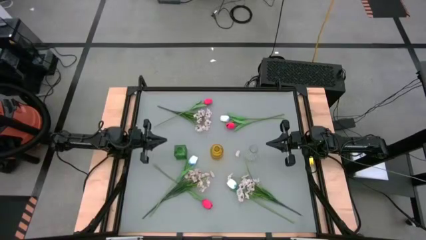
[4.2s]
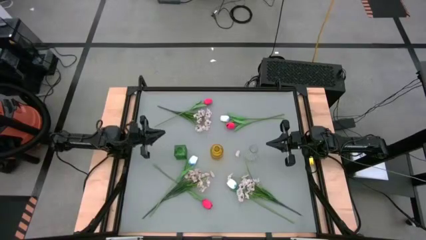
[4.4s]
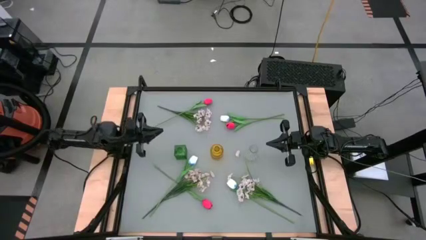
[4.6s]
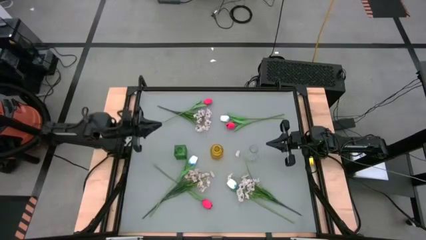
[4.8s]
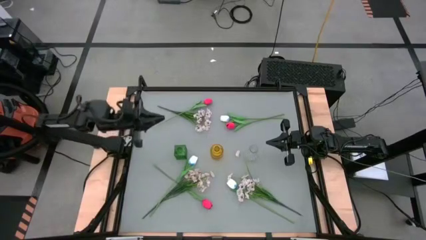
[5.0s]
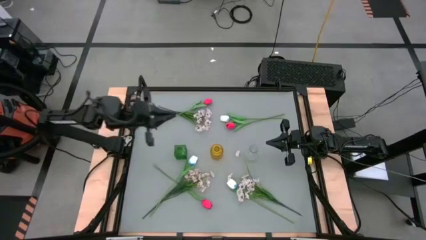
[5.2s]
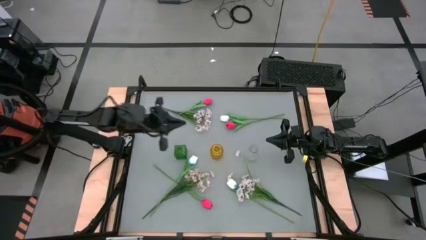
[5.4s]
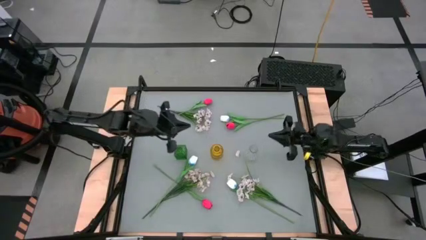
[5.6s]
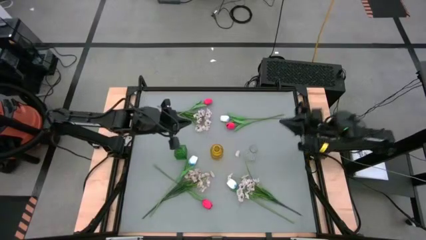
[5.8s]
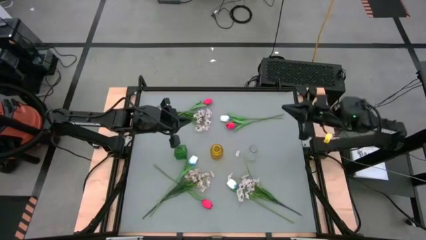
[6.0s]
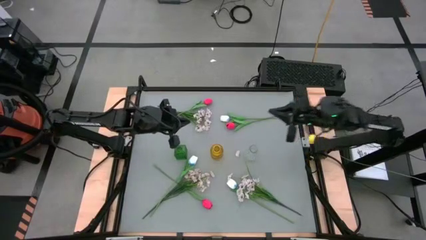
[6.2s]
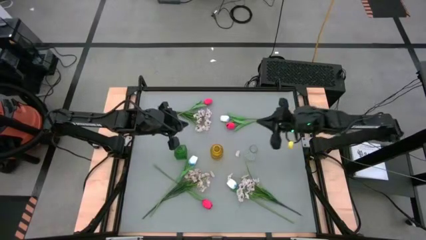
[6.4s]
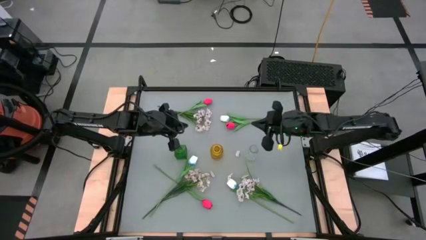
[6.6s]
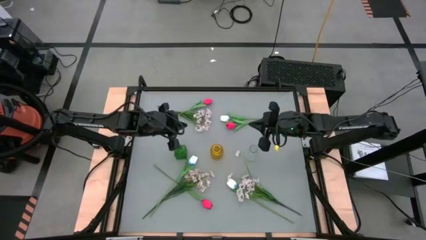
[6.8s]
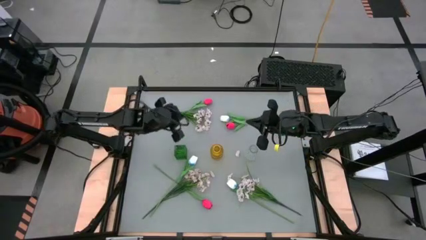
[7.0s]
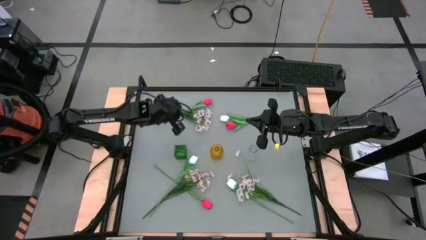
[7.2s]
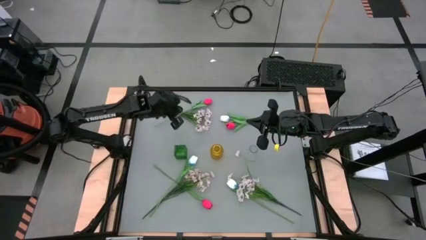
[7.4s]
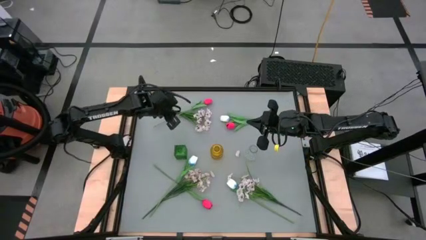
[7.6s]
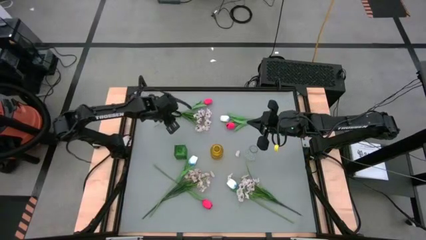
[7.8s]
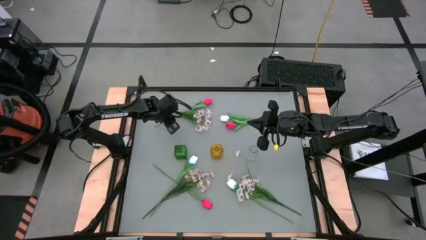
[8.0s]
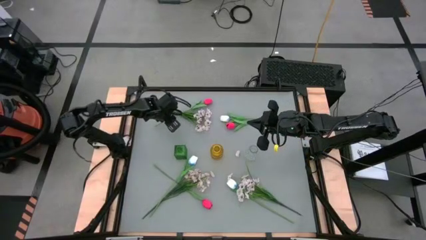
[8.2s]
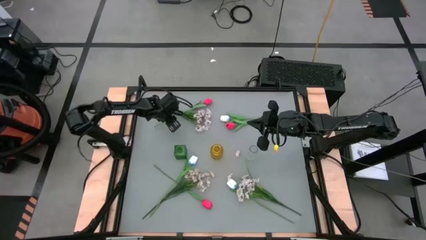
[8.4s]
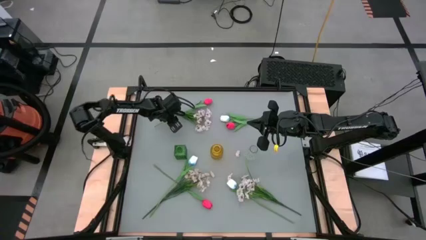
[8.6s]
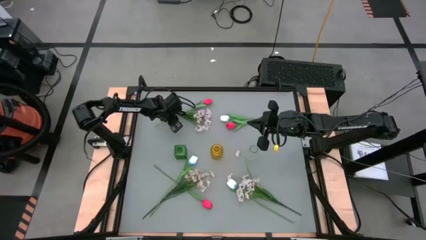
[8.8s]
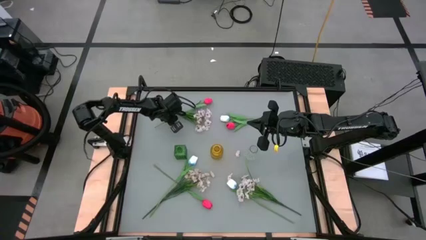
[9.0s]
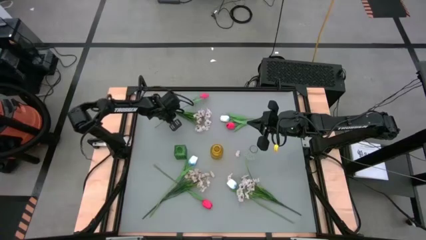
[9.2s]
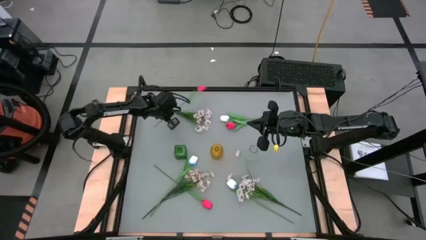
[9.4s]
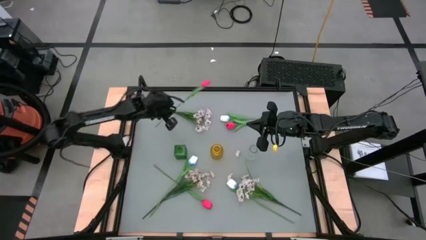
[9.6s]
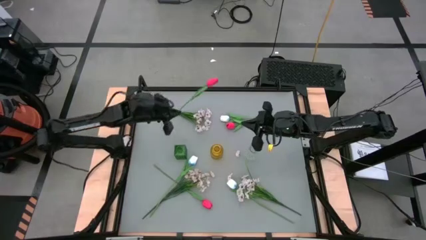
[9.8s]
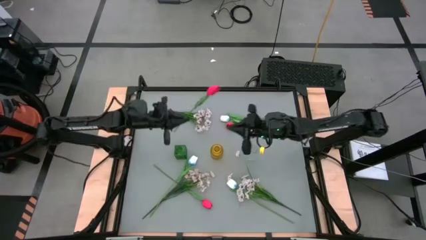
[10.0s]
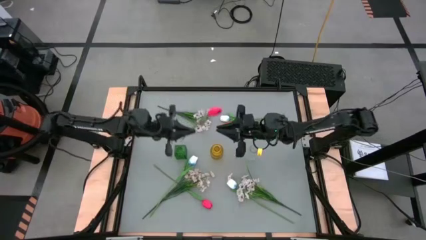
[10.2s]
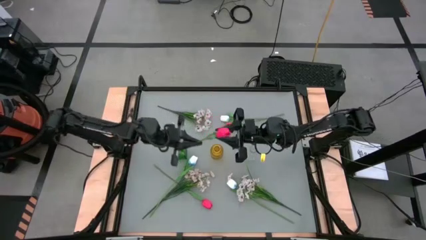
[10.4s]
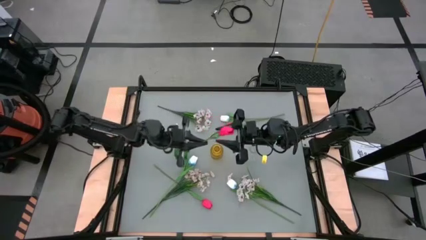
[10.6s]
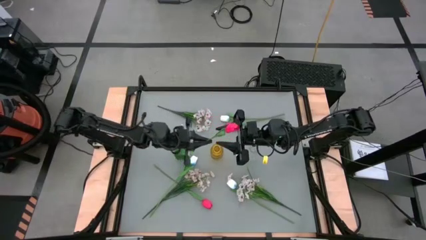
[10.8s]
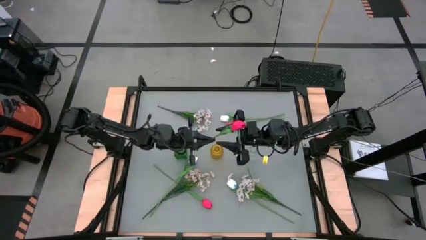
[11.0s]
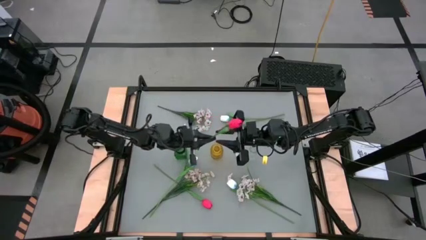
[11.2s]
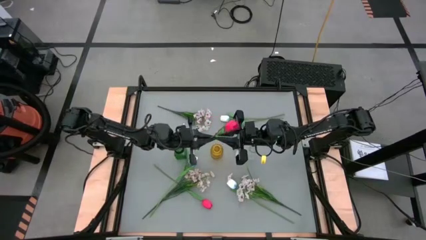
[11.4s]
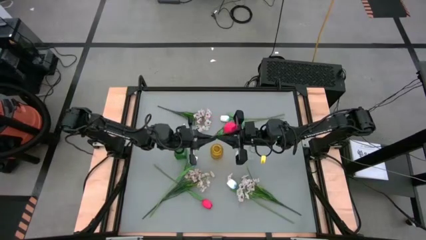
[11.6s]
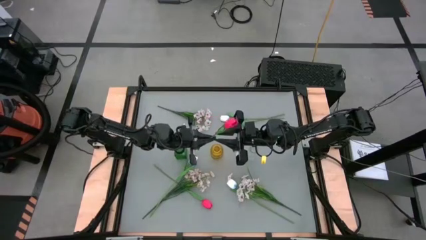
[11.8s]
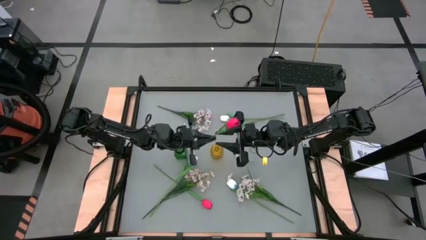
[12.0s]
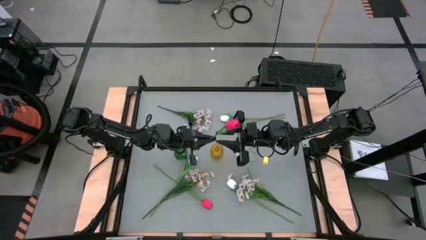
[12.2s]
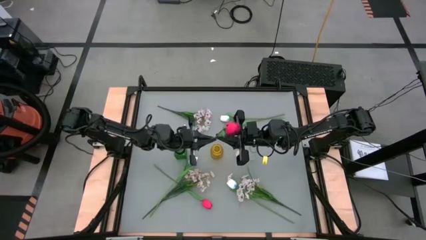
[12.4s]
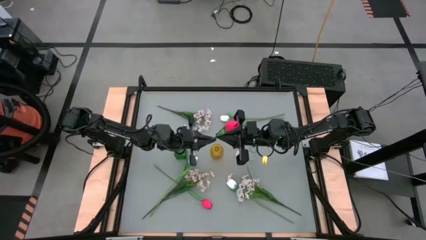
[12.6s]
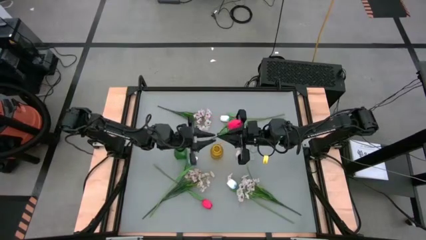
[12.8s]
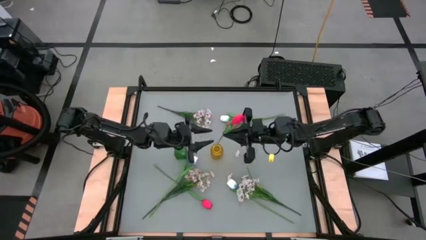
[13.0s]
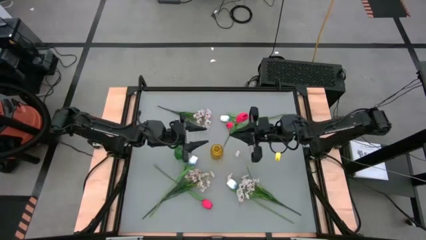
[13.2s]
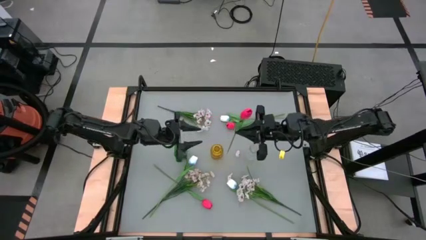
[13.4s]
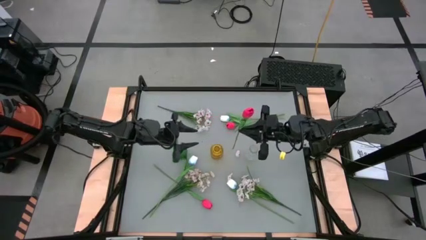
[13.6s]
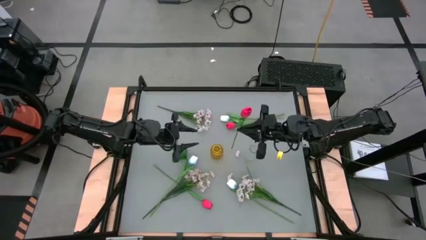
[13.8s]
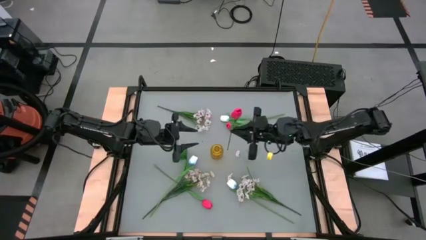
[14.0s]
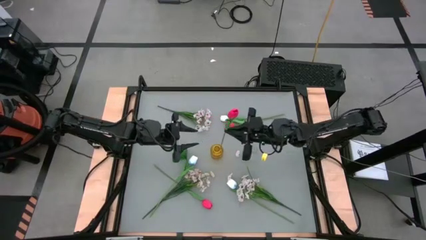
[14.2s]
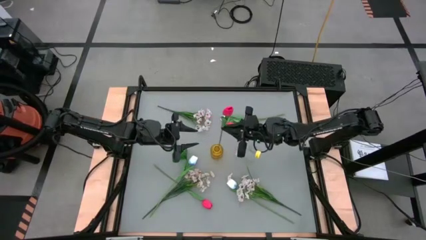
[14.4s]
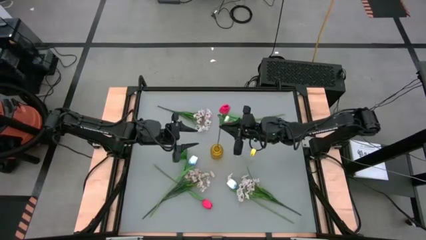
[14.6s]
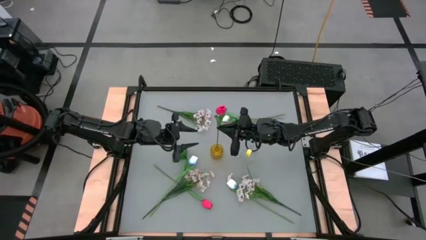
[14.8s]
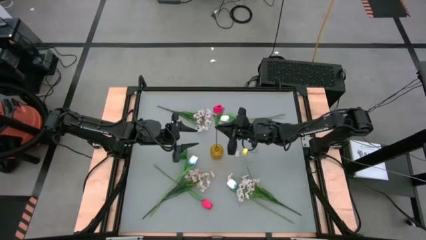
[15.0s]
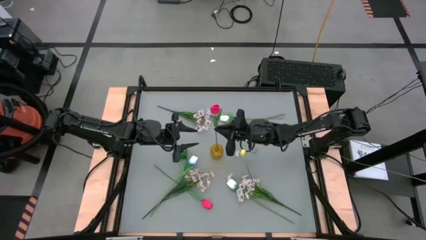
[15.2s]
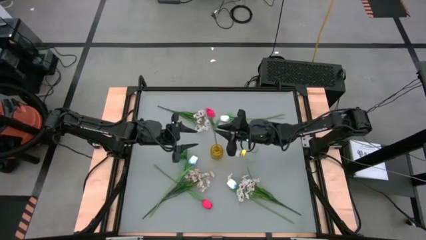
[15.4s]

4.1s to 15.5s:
Task: Sort flowers into vase by color
Put the top left pink flower into the yellow flower vase

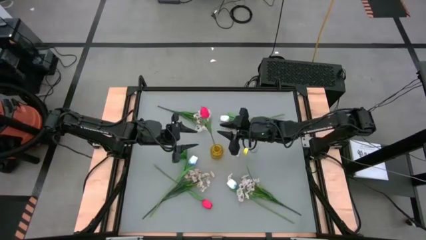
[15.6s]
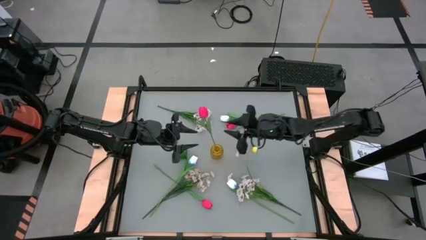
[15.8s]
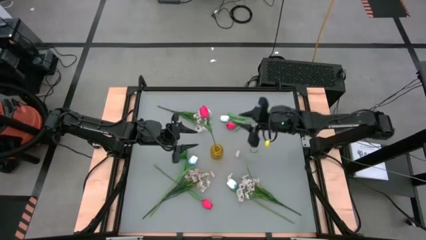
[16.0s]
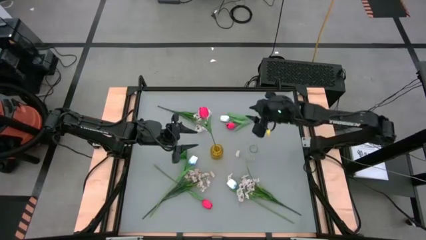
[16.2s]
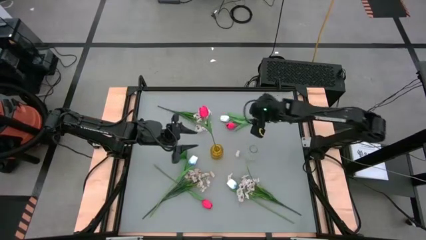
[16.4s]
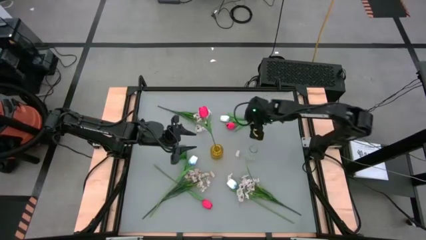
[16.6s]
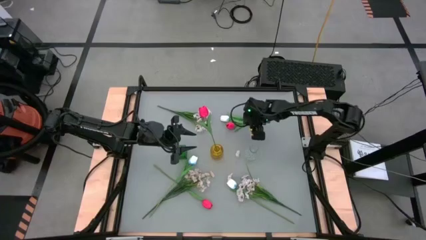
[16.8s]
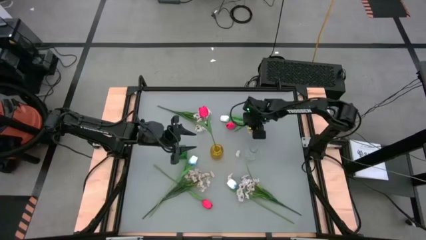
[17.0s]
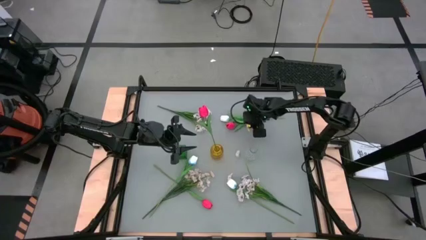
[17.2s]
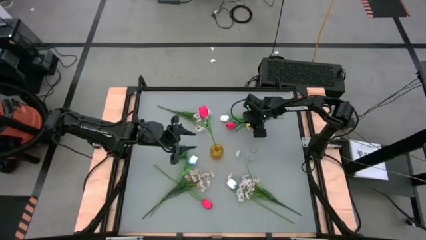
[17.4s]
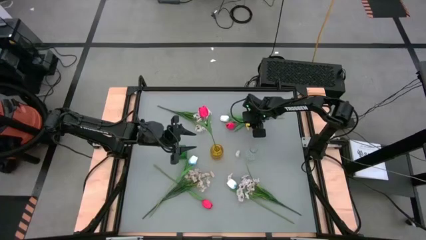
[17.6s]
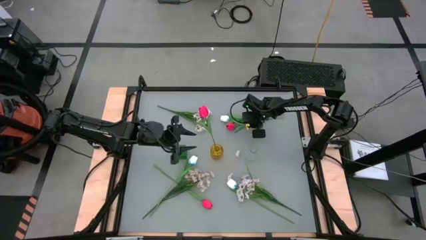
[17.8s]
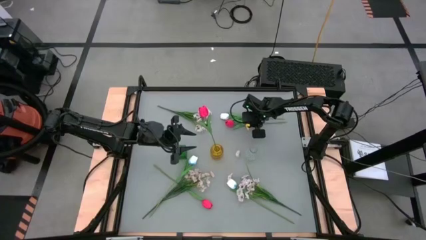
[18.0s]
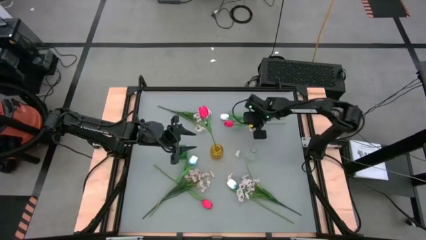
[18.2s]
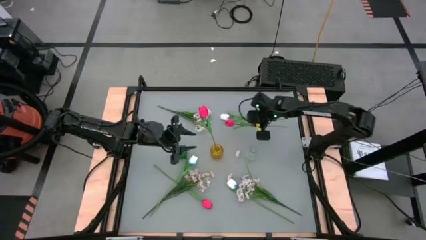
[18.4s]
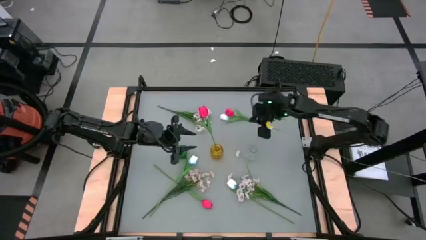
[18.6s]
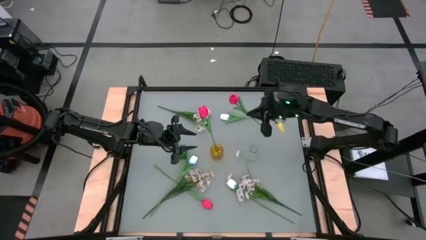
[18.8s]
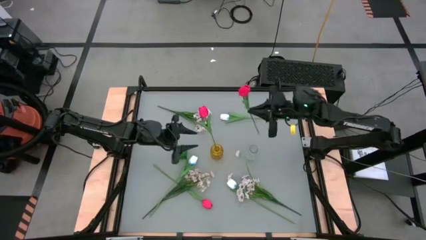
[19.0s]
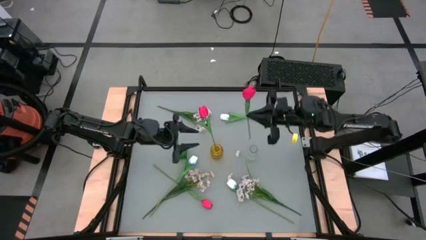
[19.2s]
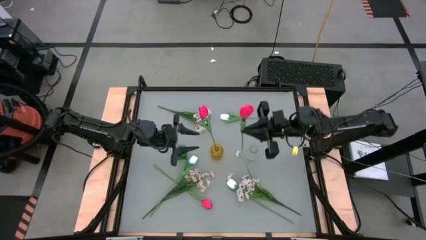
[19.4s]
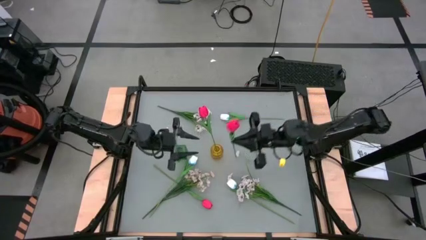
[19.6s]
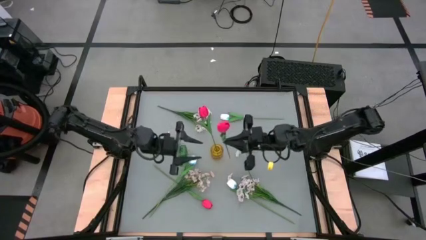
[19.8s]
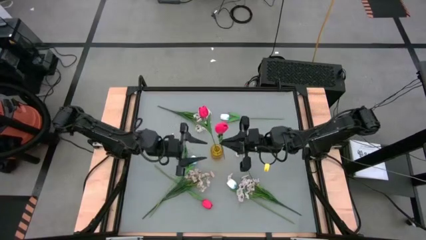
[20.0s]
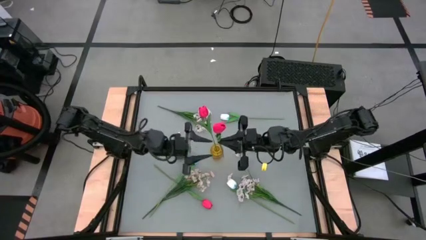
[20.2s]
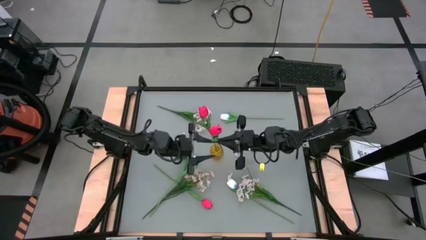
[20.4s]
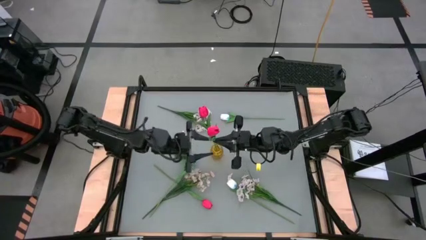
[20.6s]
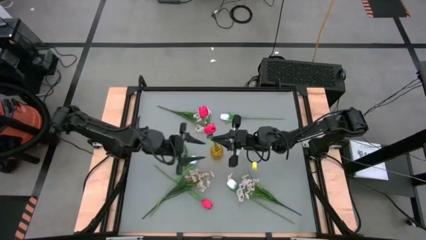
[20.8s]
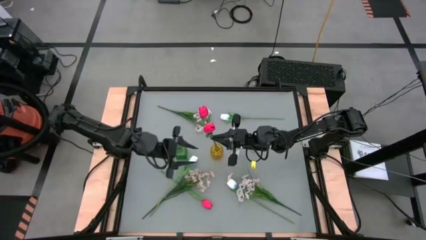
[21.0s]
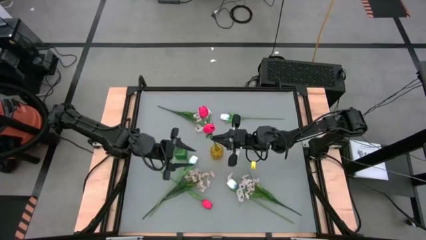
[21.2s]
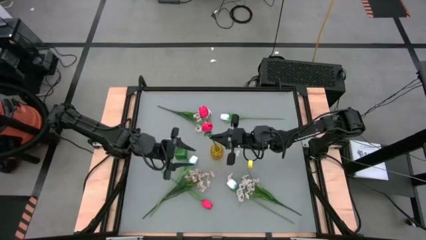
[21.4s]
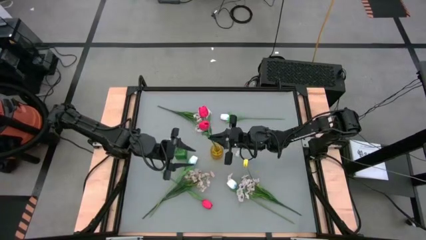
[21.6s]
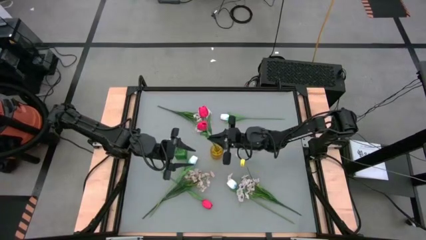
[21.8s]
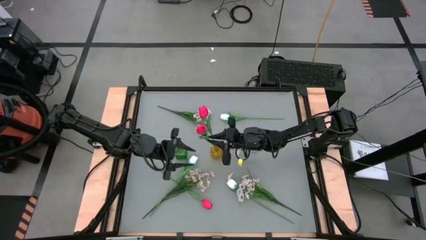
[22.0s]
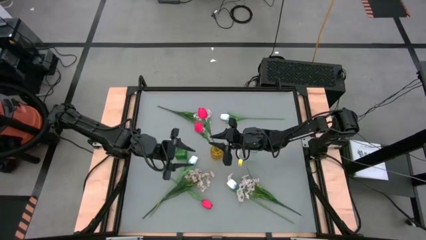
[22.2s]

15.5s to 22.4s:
Put the top pink flower into the yellow flower vase
